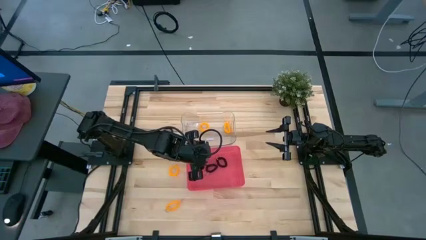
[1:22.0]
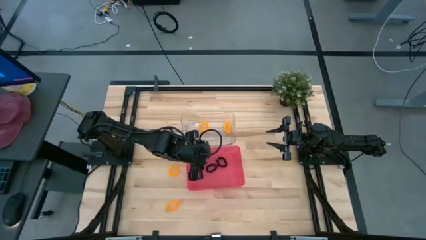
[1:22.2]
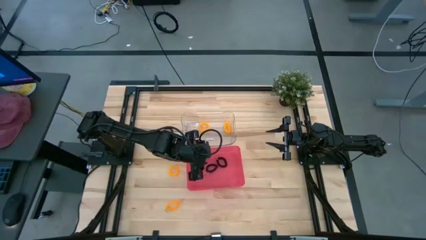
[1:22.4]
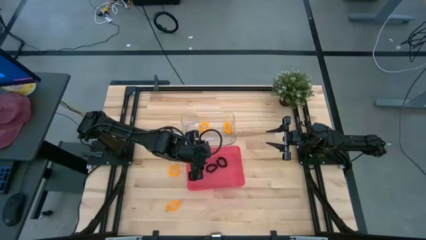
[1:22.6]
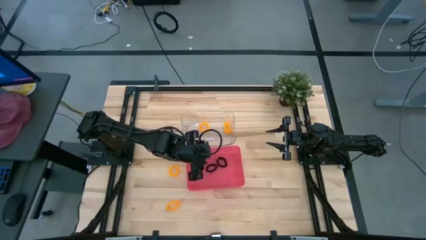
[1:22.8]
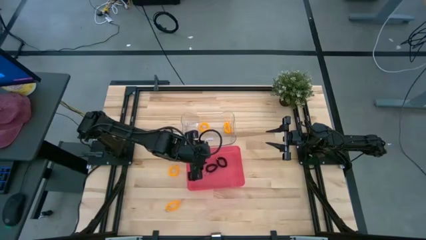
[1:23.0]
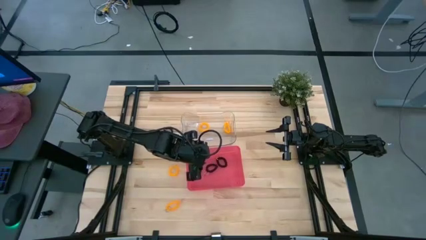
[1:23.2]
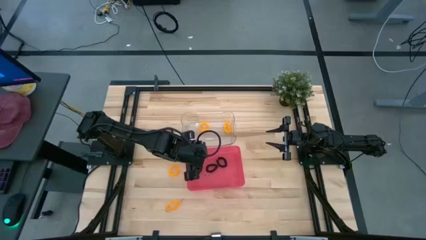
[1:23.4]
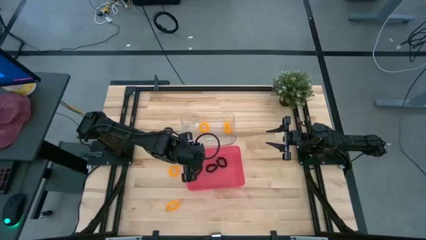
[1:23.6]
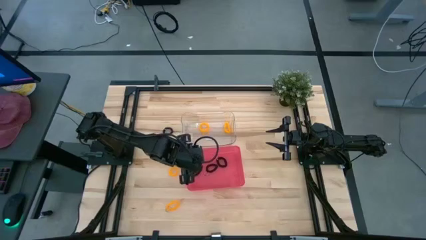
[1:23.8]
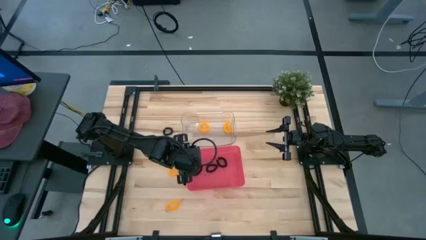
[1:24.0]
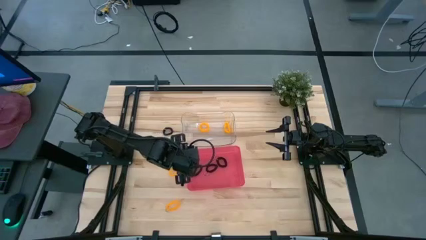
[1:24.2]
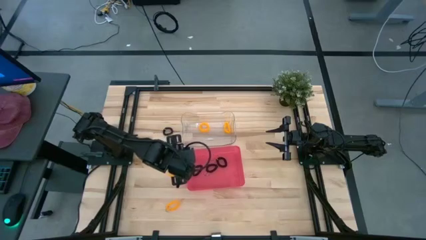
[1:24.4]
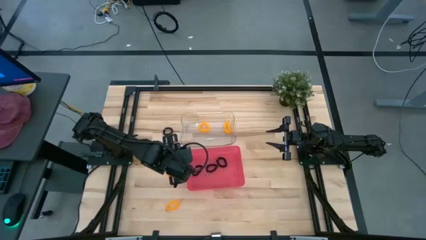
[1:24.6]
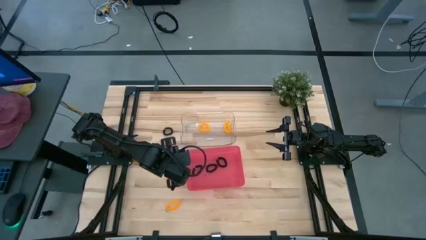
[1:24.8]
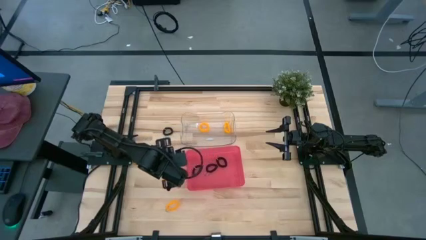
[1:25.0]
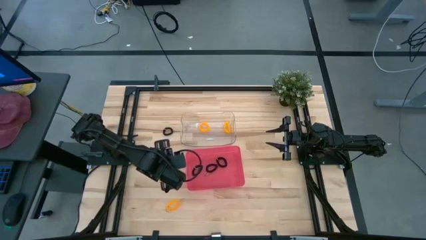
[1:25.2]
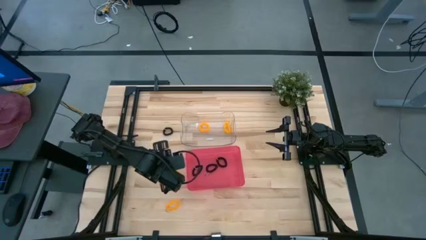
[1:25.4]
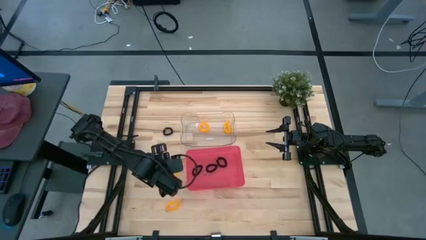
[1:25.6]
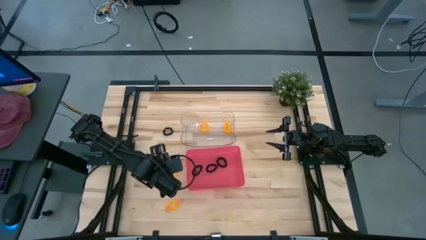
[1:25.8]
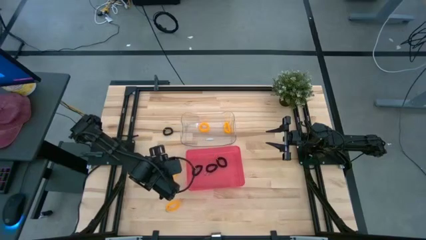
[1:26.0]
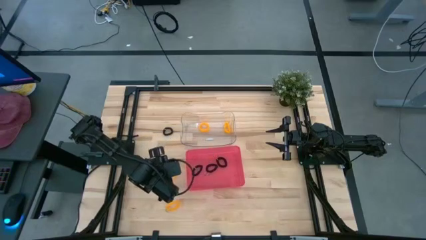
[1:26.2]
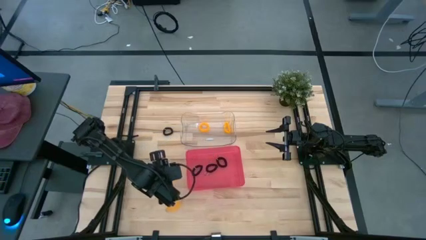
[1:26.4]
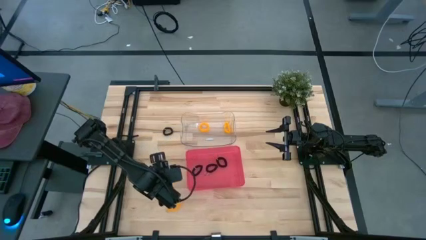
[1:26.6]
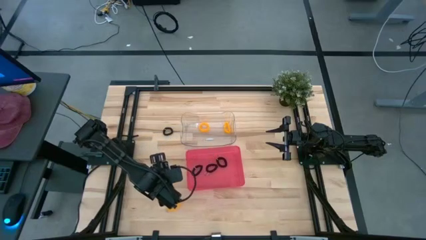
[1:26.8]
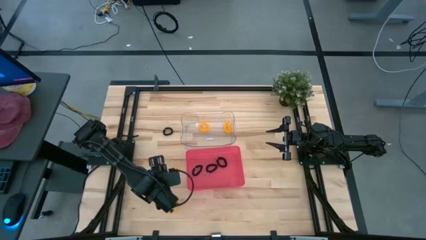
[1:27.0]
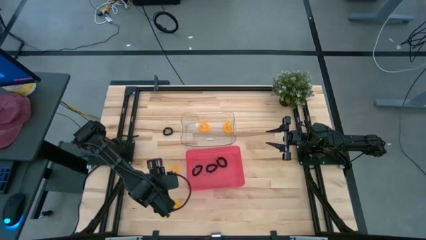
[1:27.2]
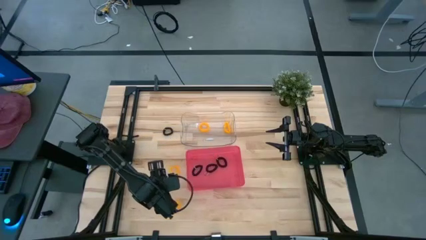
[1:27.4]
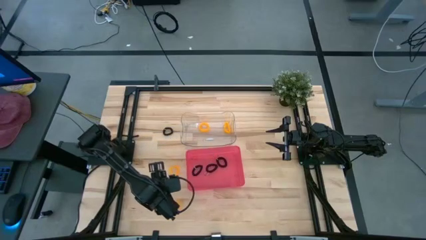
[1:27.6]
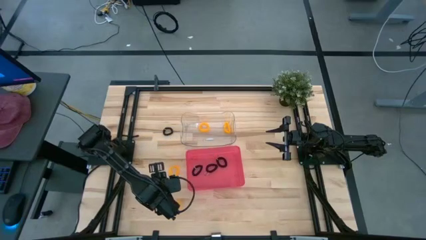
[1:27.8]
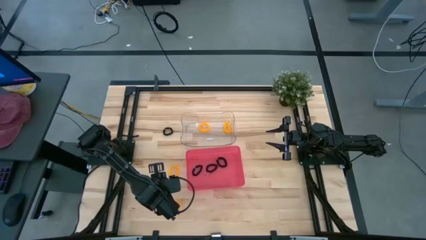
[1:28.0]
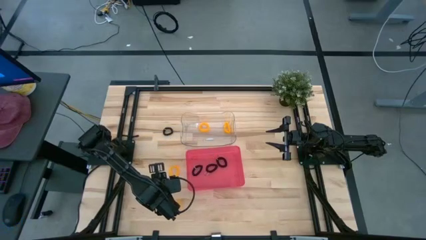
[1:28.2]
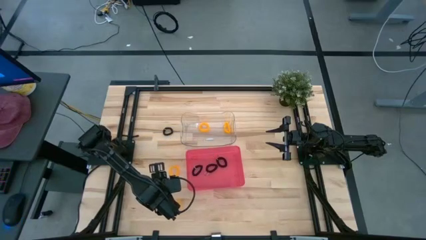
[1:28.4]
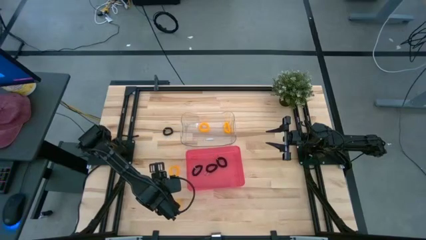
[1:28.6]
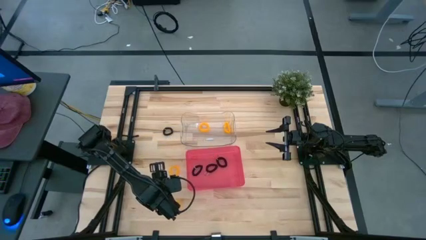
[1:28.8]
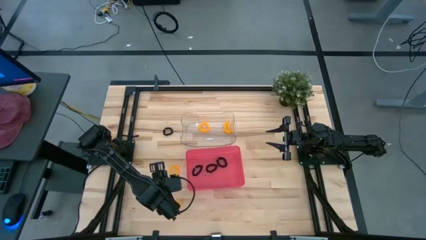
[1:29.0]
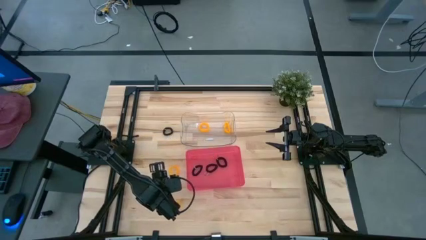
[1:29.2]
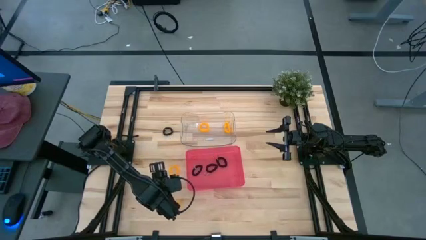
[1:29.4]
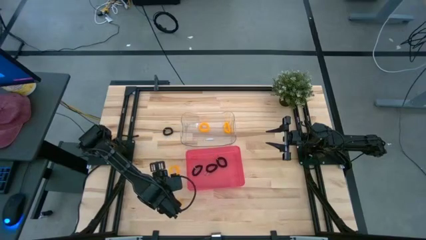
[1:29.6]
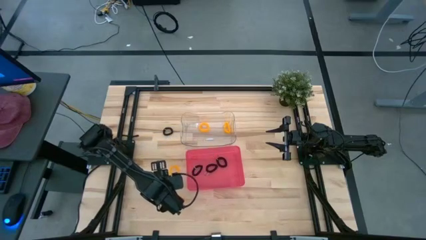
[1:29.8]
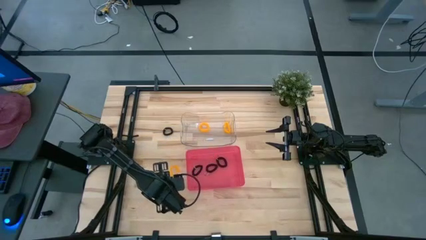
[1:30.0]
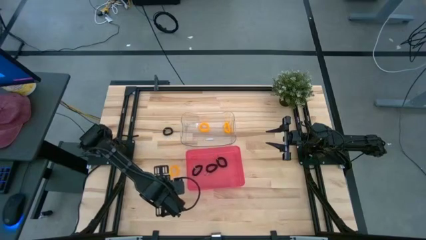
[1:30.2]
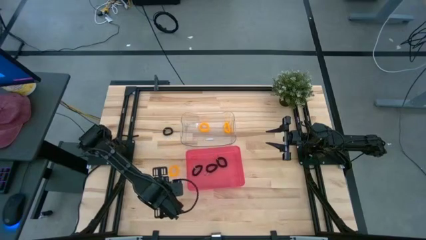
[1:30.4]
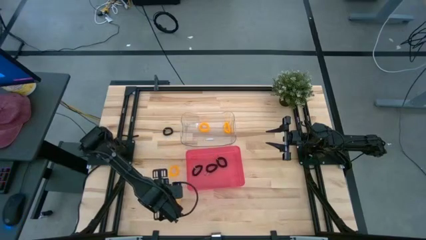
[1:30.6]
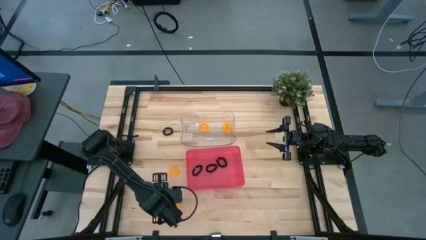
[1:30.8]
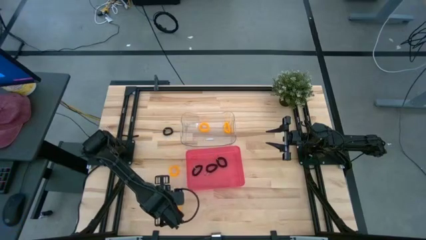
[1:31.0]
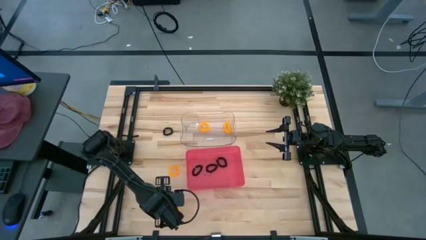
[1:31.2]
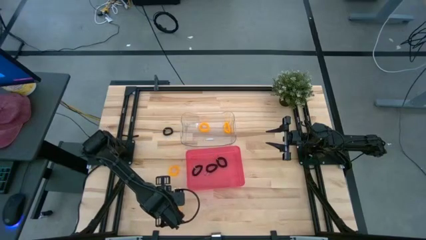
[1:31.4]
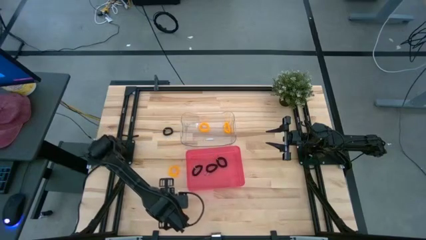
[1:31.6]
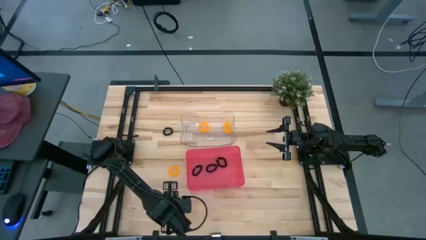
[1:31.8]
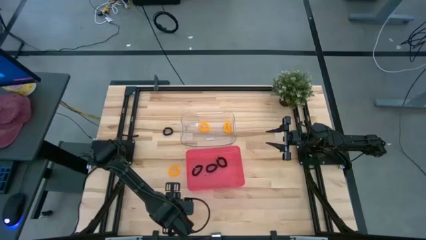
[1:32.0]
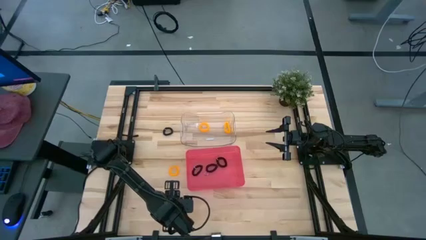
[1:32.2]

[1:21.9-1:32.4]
Task: Sort spring keychains
Put the yellow spring keychain into the transparent bin

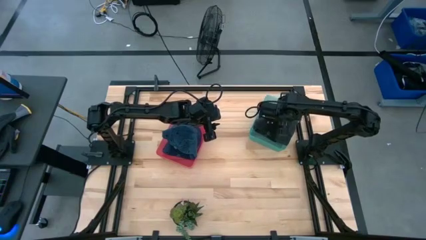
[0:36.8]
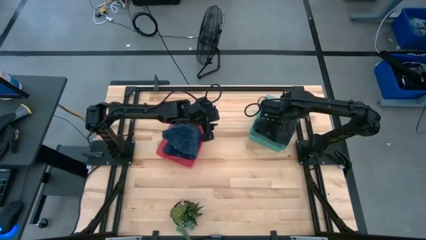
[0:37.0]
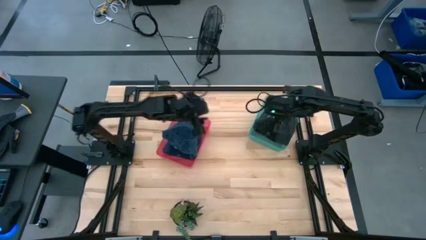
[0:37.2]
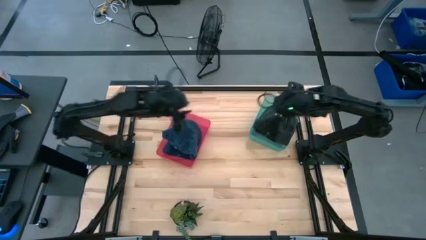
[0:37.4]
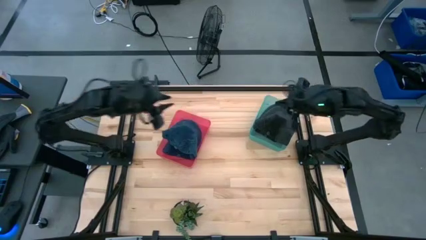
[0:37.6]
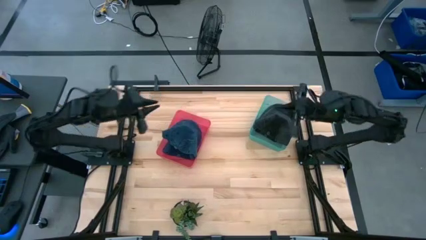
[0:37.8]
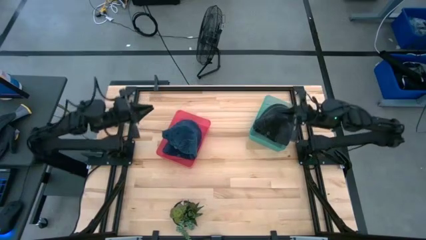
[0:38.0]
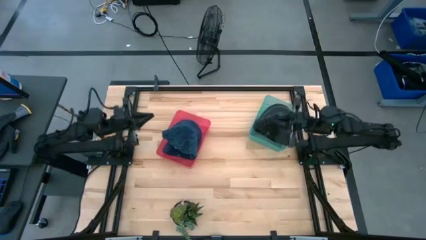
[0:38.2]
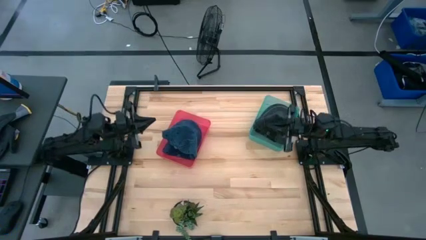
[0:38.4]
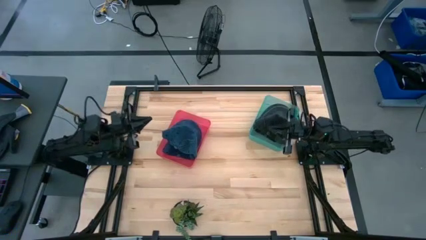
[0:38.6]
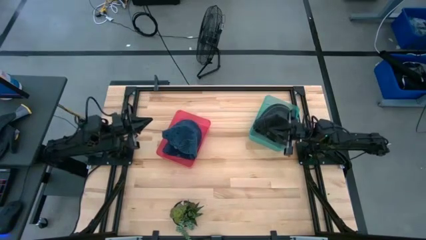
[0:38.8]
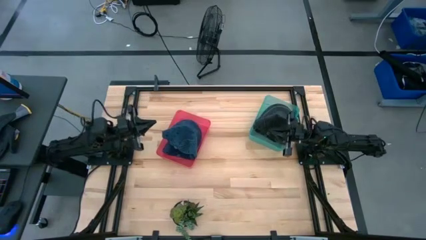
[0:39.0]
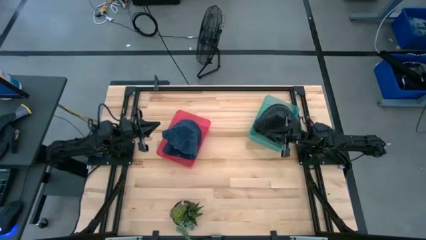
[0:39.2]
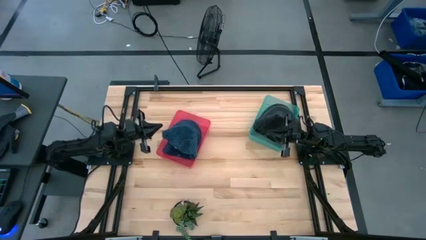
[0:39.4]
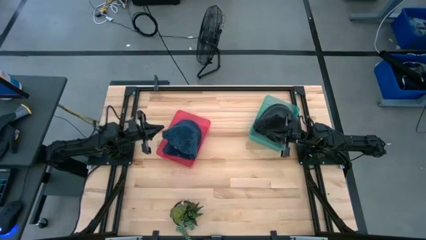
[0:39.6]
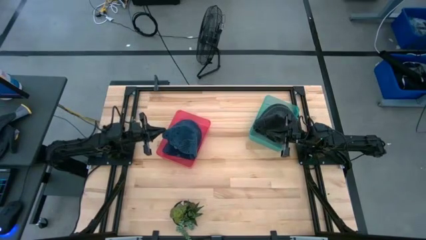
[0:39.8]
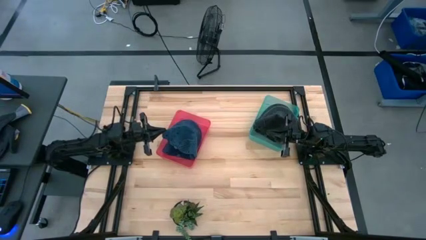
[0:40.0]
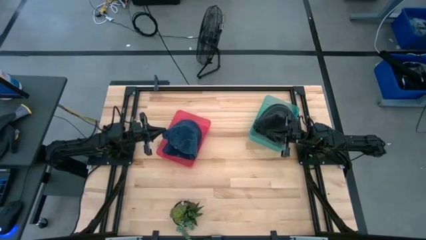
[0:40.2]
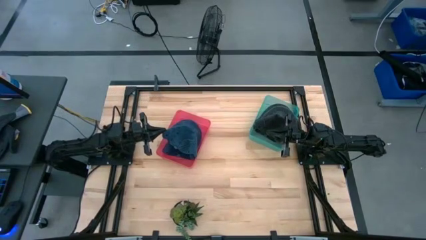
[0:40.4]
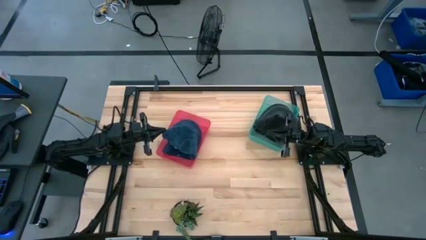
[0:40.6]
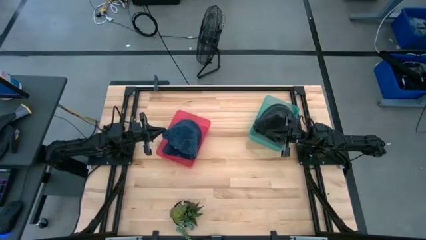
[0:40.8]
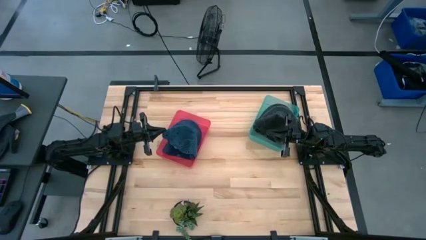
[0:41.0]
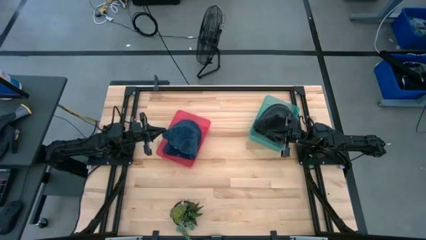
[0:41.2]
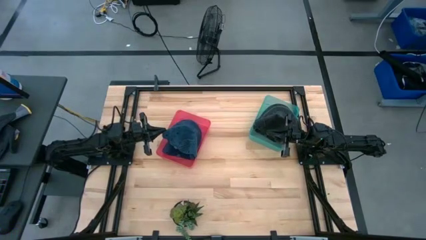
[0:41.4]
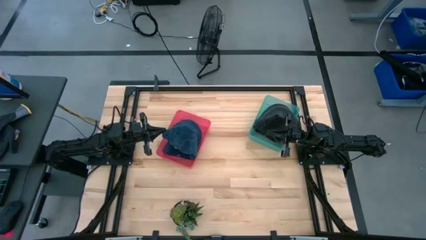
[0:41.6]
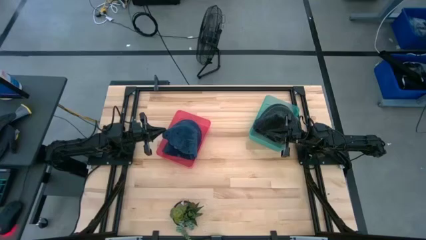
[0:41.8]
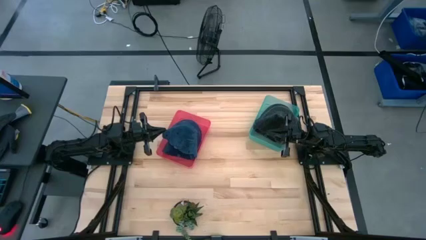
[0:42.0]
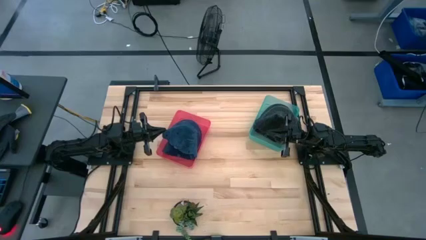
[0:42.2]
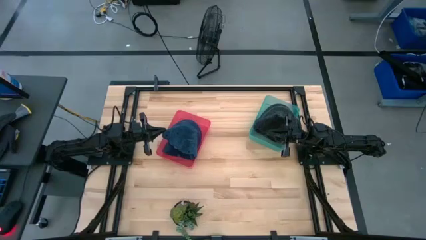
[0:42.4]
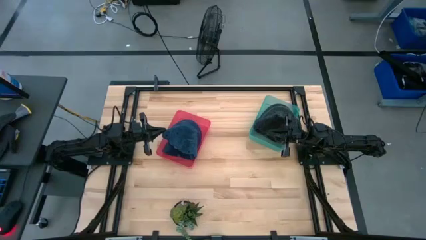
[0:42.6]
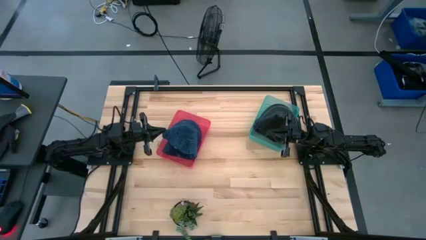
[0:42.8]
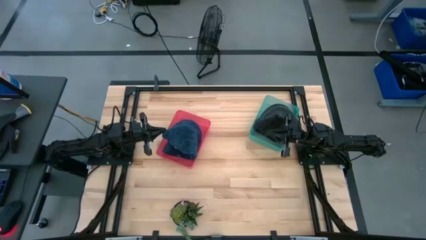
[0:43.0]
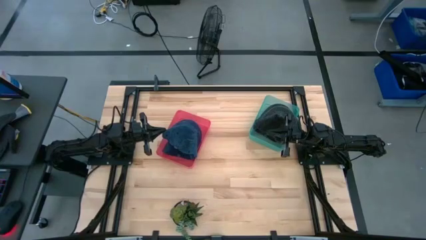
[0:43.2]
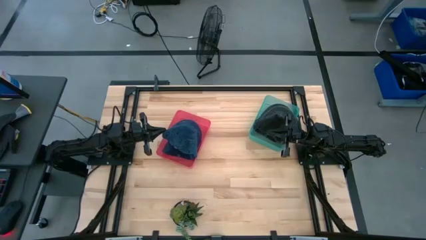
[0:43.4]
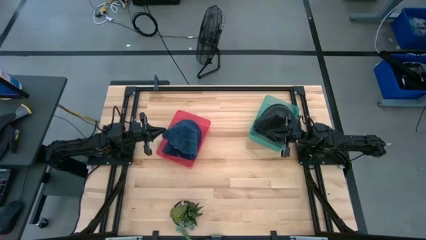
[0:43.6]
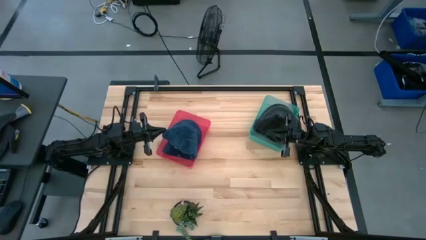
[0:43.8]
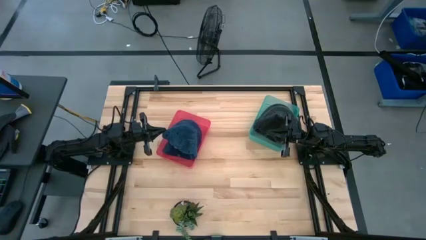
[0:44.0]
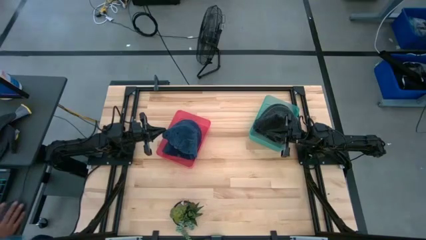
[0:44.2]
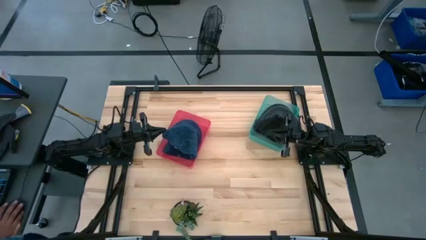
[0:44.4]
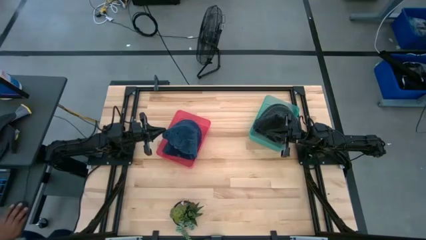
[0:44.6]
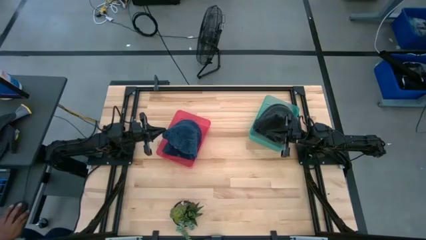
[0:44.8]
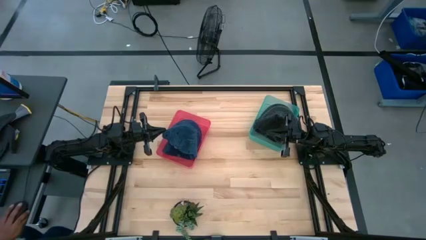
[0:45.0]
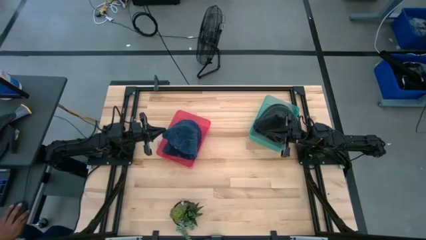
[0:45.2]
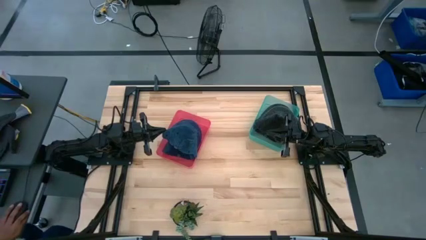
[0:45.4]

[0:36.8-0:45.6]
Task: Pick & Place hat
Return to Home Position
